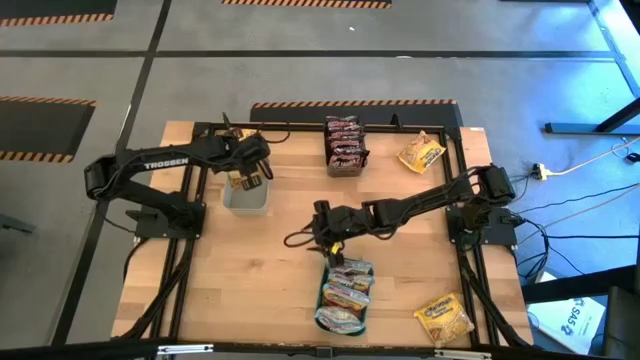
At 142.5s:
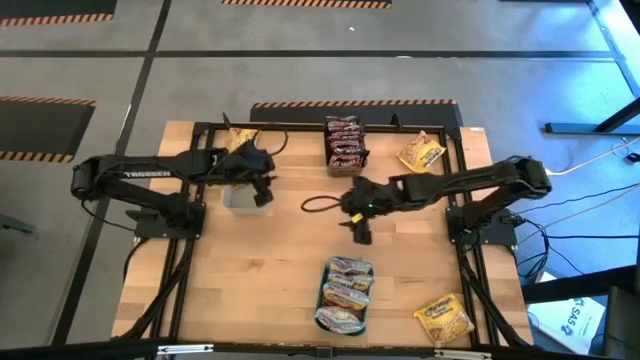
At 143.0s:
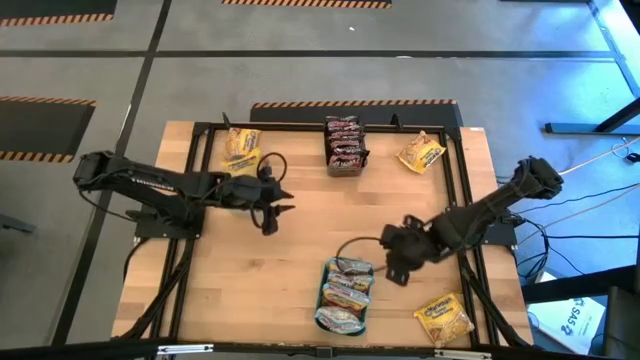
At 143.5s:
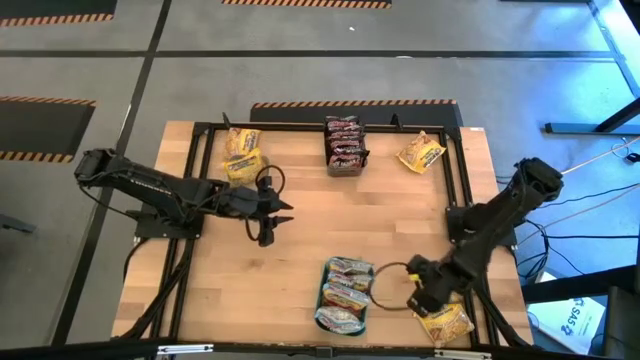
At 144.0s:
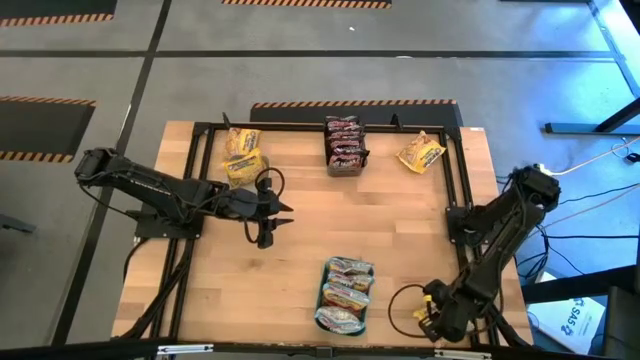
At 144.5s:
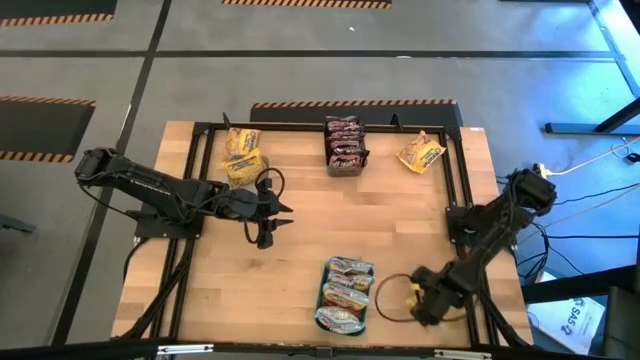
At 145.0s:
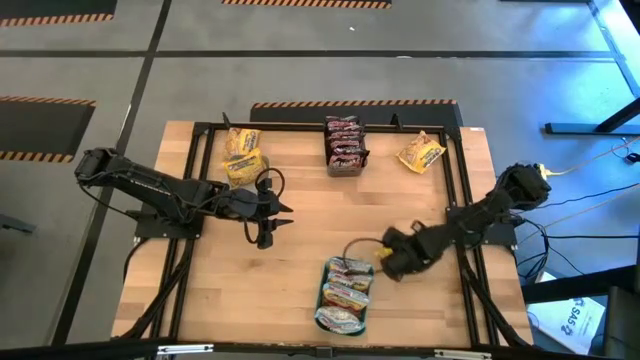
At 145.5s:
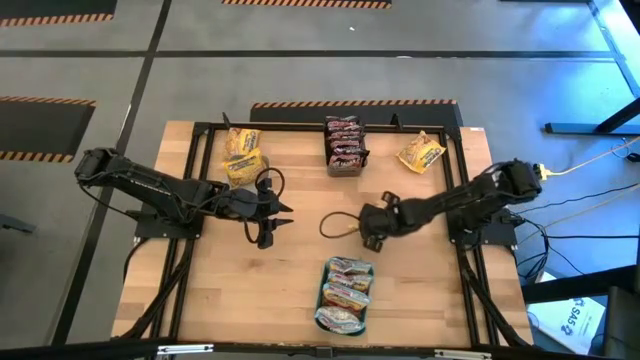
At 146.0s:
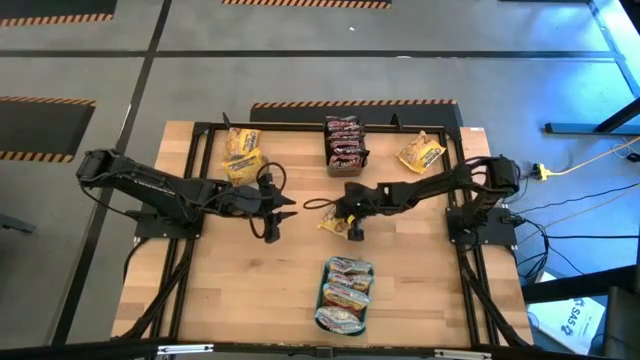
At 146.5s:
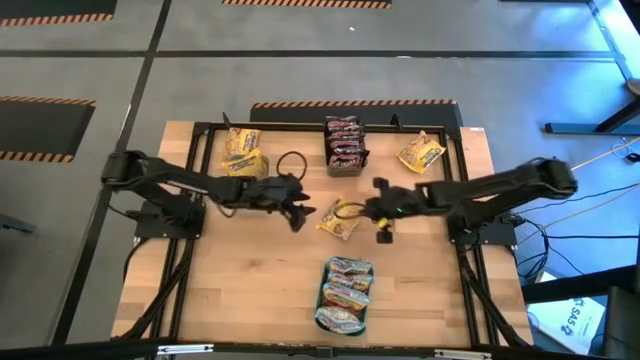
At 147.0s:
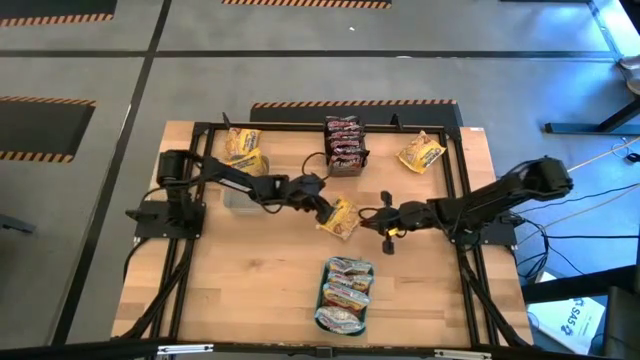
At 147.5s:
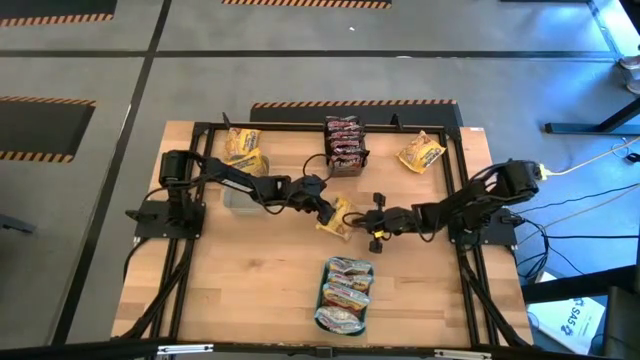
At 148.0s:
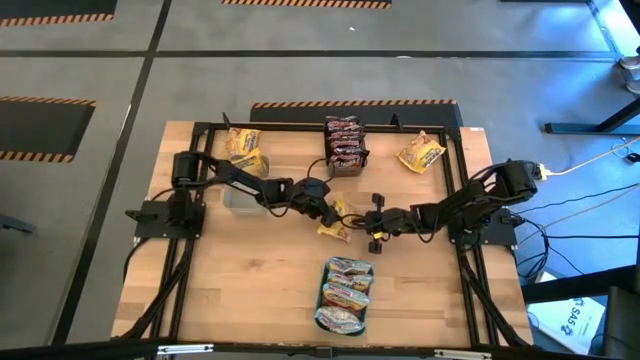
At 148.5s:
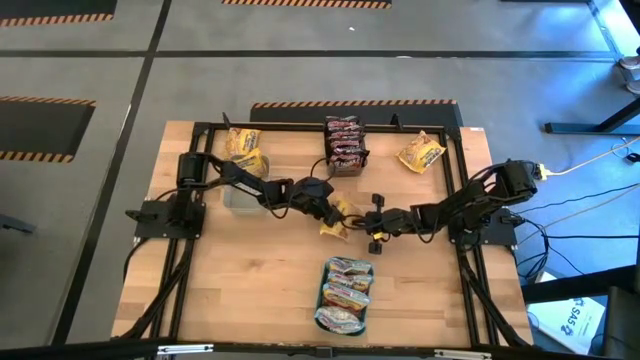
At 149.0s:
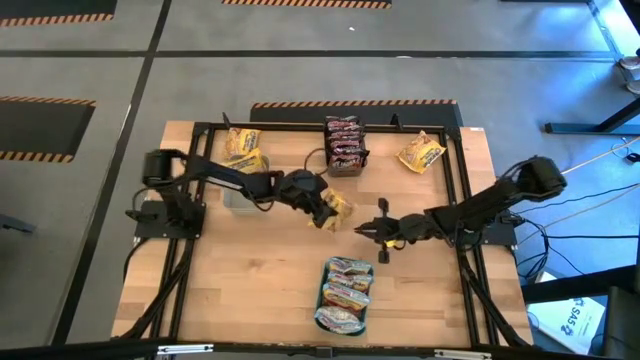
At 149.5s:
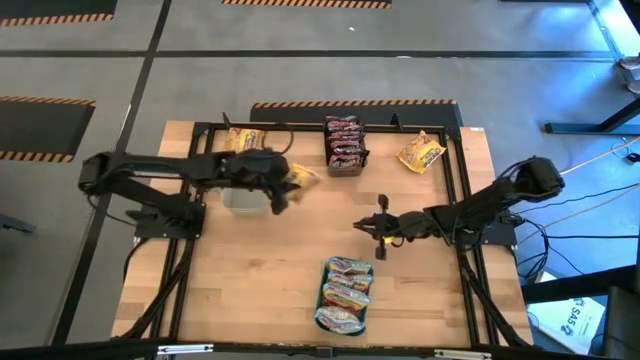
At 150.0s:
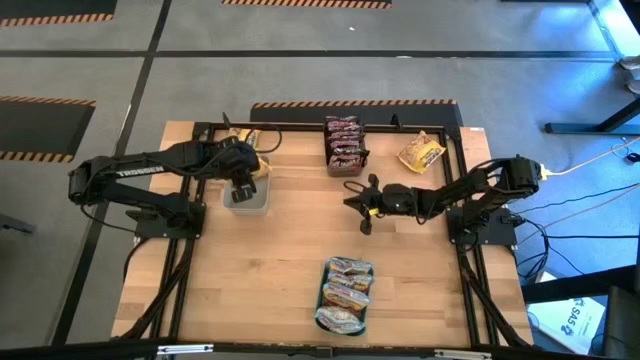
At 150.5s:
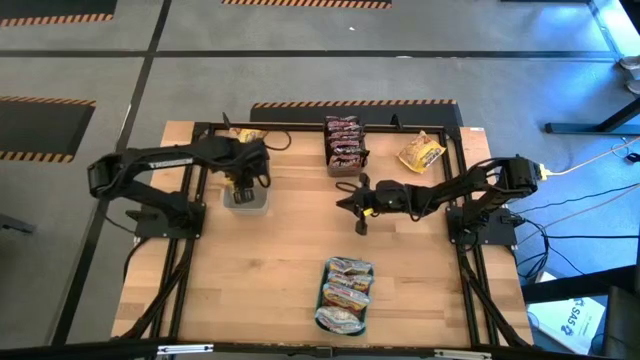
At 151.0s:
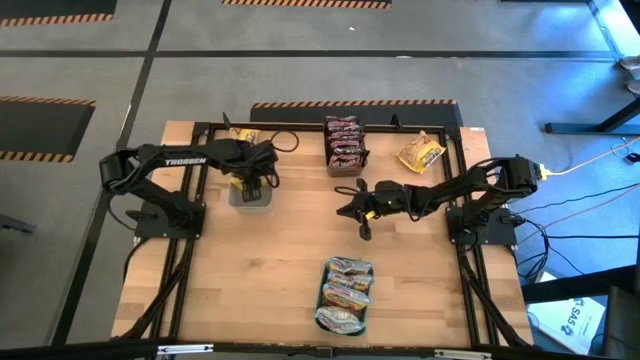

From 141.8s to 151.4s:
Task: Sort Maruchan noodles
Put the yellow noodle pack into the white bin
